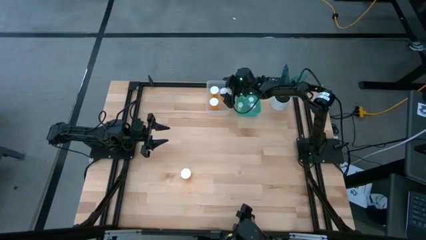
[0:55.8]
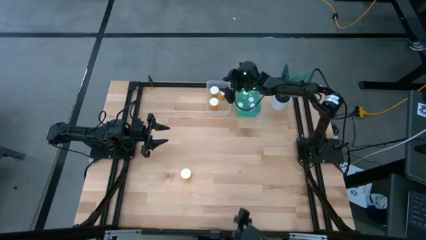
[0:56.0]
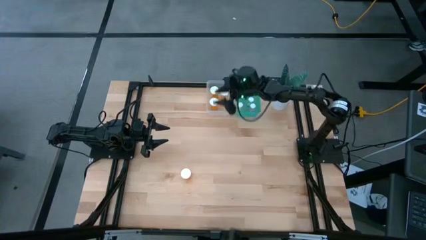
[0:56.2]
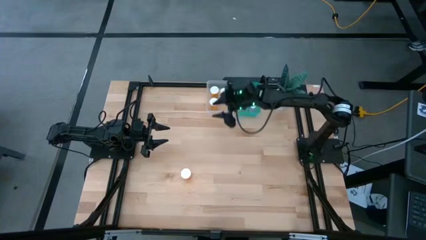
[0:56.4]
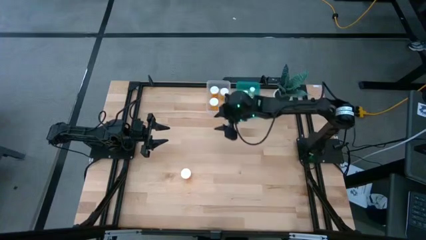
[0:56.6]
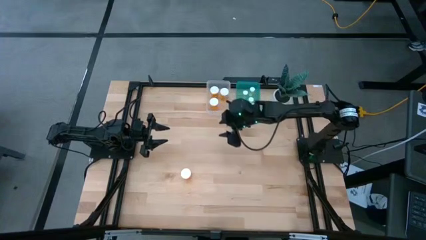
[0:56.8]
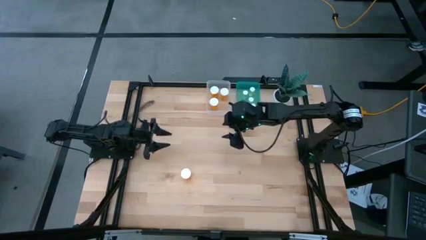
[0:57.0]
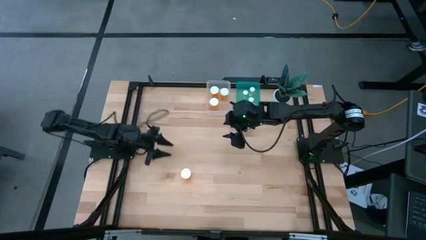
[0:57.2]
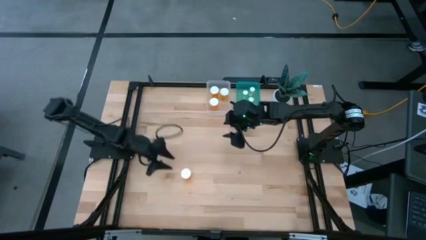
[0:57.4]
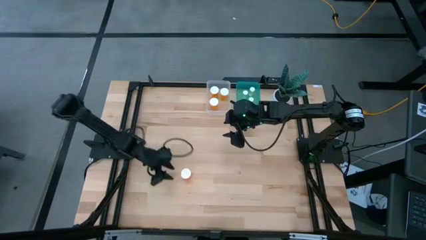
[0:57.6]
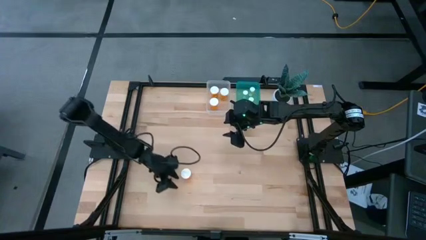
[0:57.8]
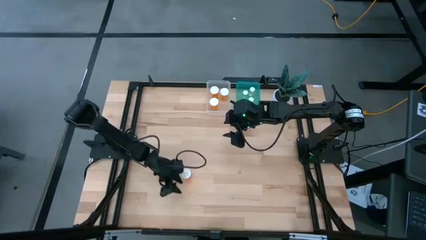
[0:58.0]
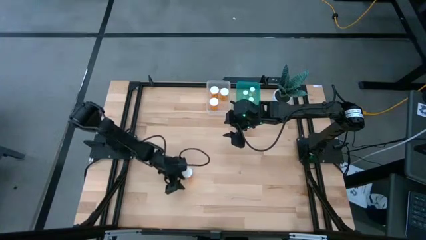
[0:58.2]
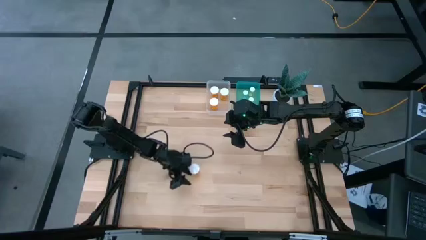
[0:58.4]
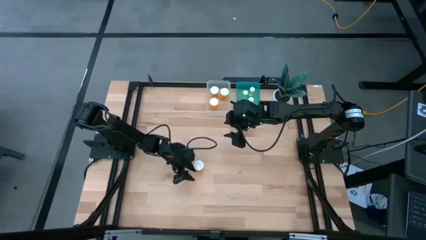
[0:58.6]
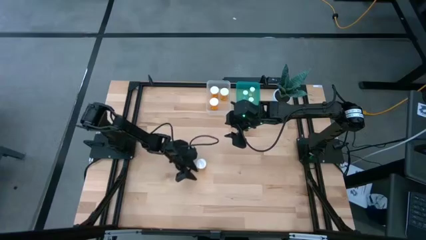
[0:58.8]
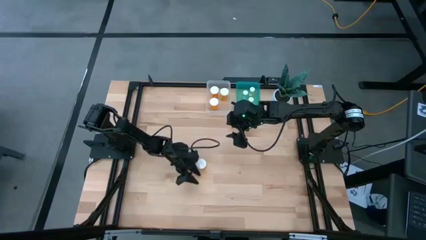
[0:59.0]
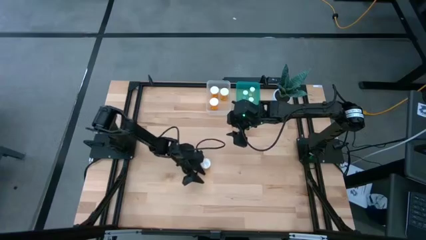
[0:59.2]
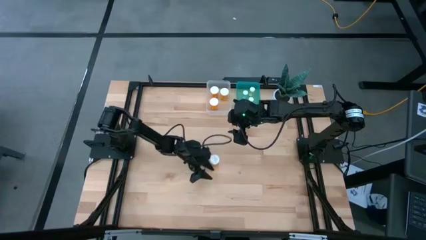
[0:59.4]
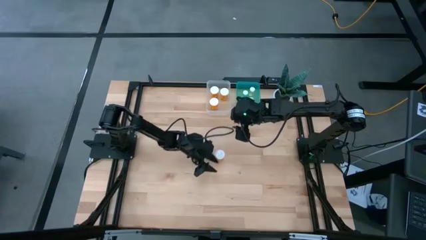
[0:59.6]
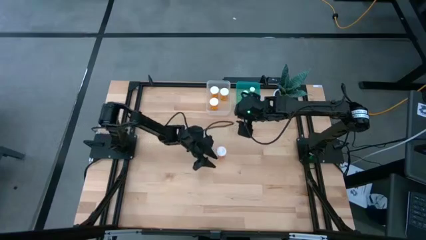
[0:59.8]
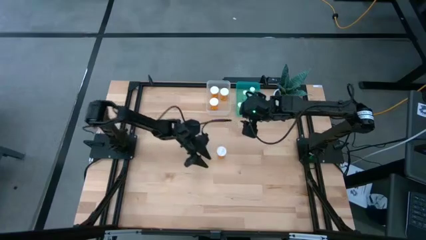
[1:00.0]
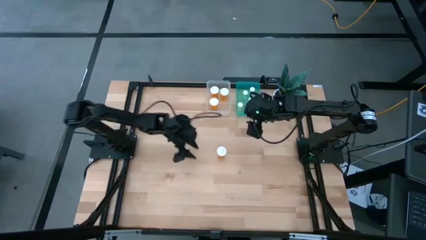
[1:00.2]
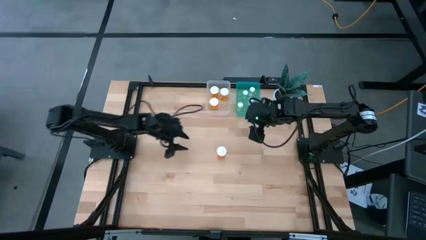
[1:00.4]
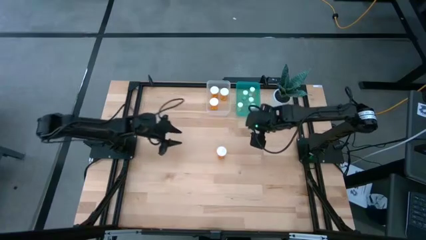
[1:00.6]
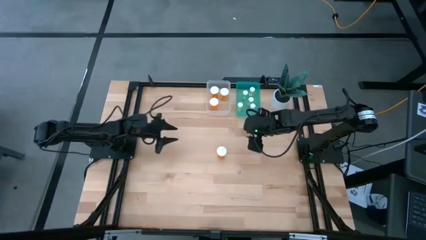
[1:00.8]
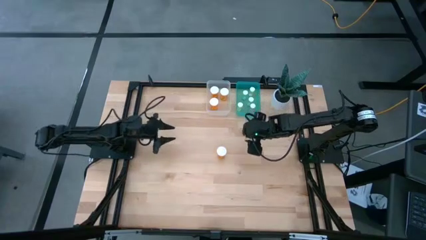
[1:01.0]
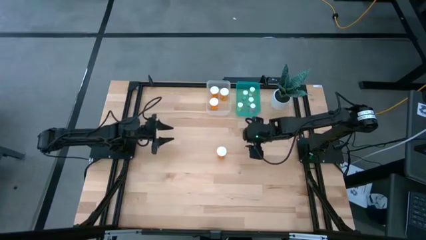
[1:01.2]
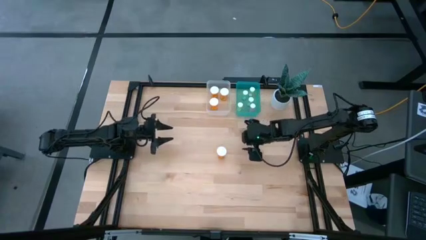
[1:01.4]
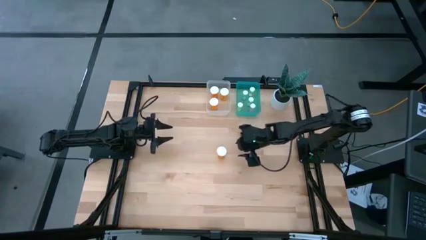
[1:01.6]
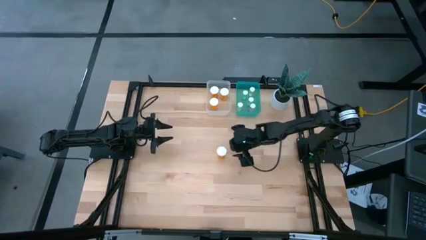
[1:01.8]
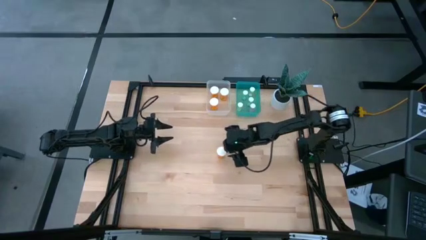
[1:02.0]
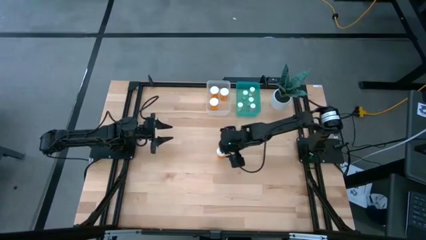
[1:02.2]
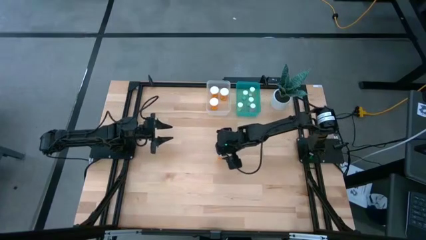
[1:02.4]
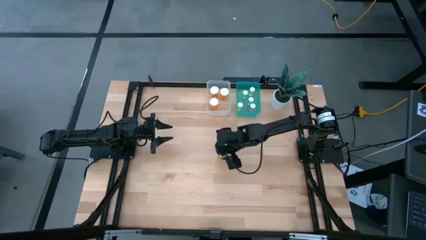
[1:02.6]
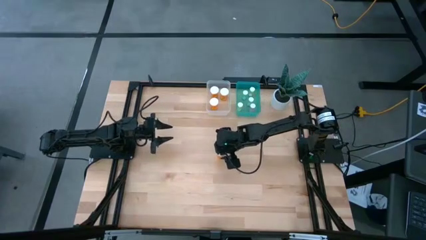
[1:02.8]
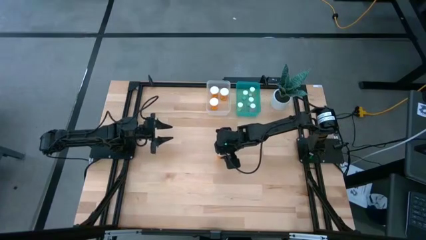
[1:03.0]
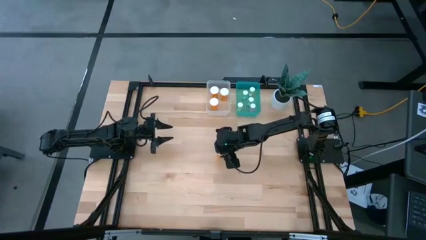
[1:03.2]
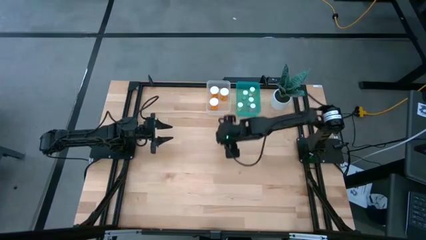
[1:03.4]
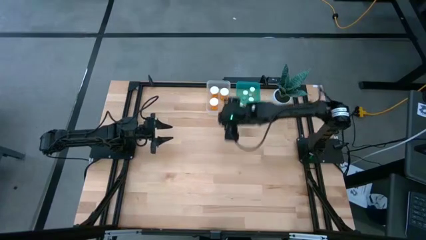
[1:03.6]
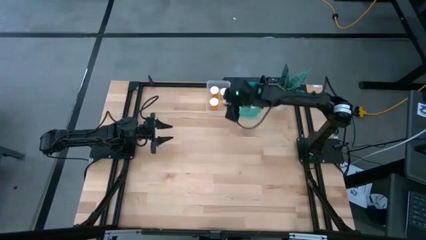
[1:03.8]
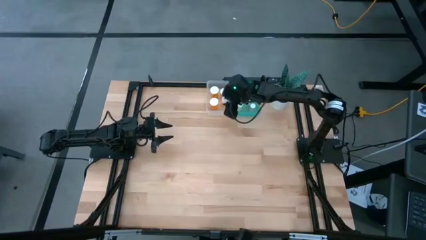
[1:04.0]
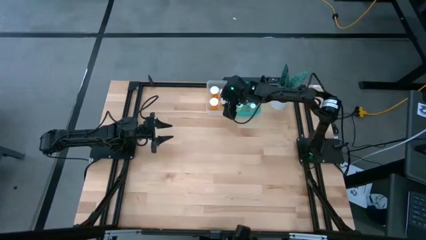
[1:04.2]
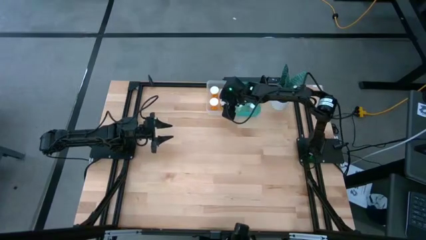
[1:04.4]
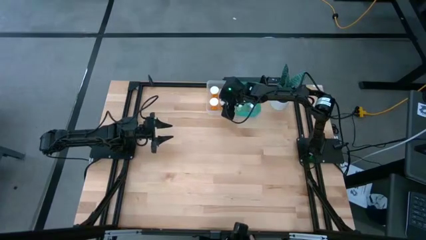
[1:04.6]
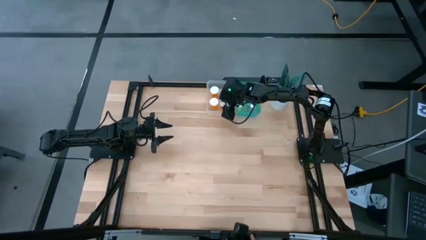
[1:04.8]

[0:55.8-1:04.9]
Task: Pick and place medicine bottles into bin by pill shape (circle, oval)
Put the large orange pill bottle into transparent bin

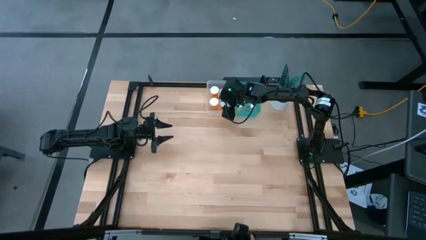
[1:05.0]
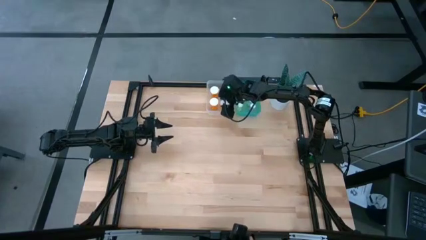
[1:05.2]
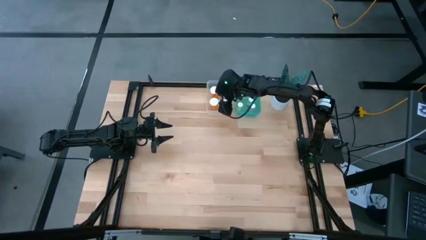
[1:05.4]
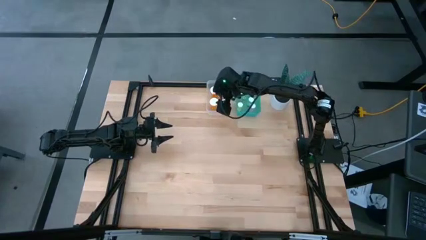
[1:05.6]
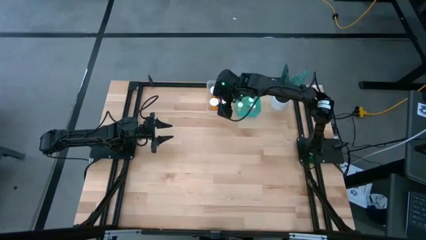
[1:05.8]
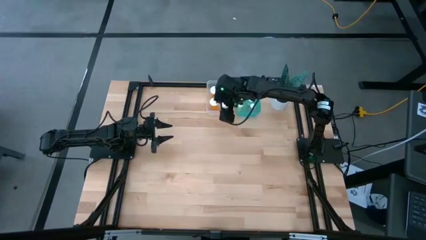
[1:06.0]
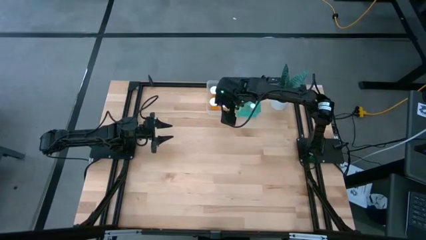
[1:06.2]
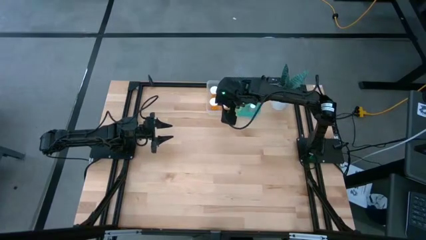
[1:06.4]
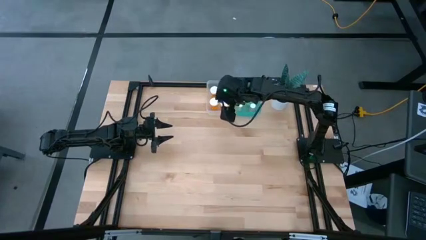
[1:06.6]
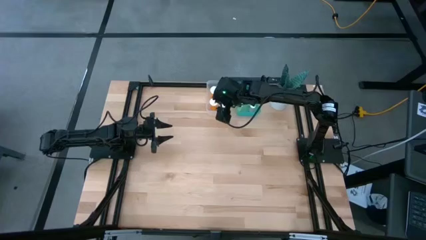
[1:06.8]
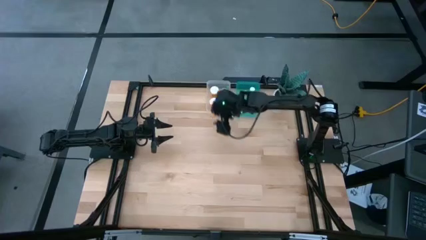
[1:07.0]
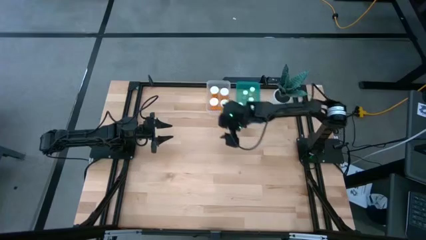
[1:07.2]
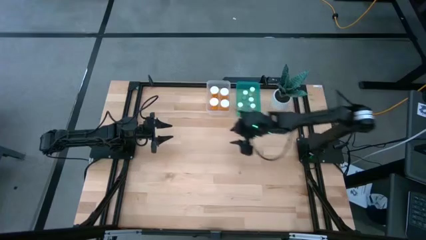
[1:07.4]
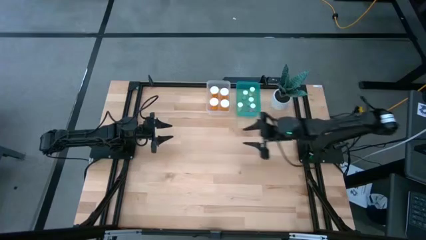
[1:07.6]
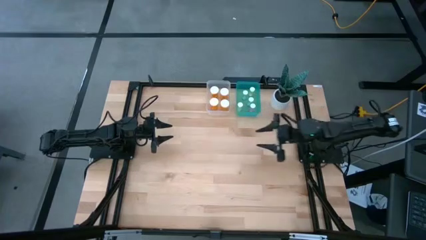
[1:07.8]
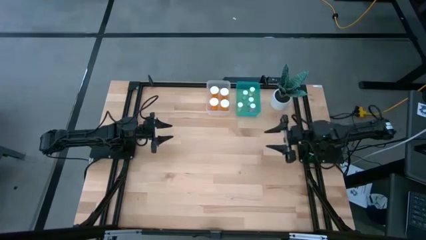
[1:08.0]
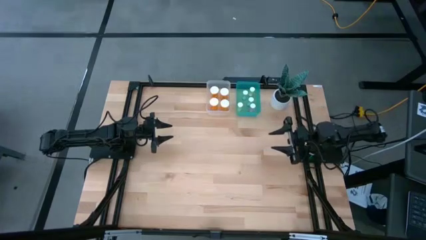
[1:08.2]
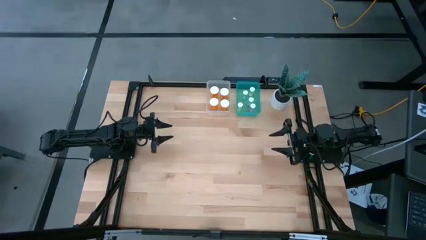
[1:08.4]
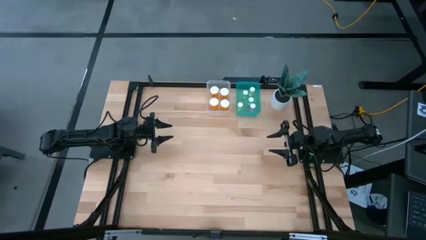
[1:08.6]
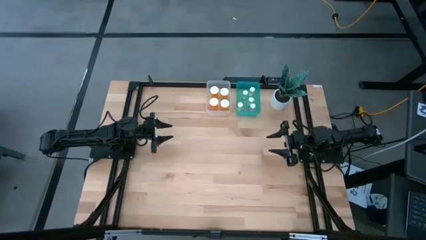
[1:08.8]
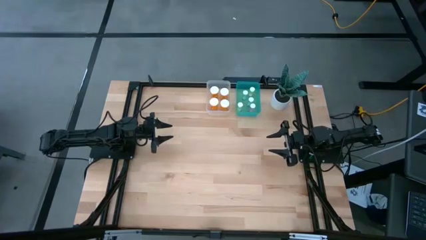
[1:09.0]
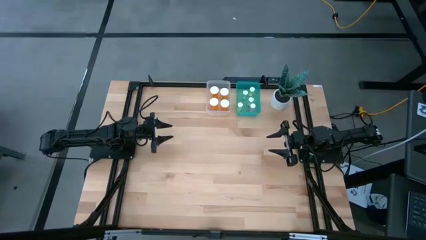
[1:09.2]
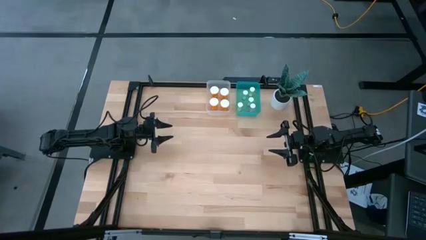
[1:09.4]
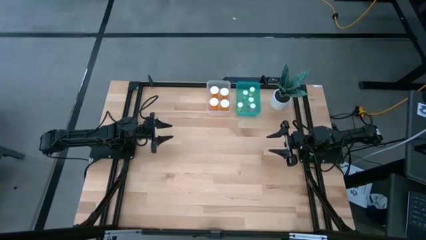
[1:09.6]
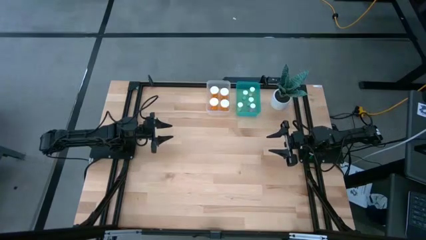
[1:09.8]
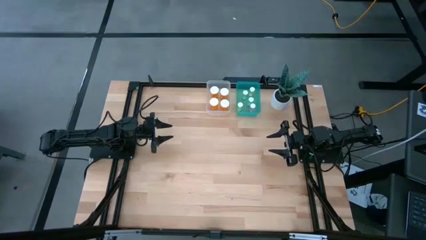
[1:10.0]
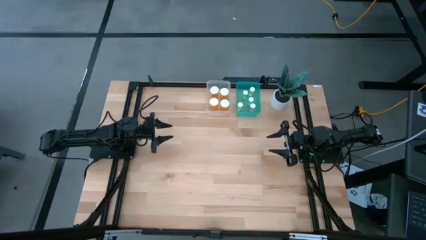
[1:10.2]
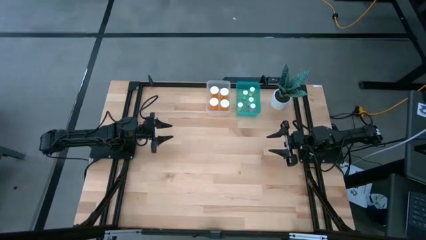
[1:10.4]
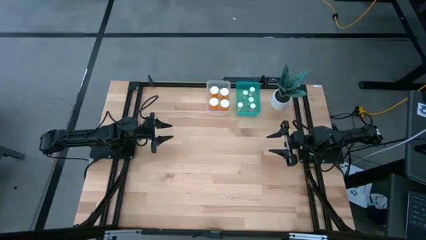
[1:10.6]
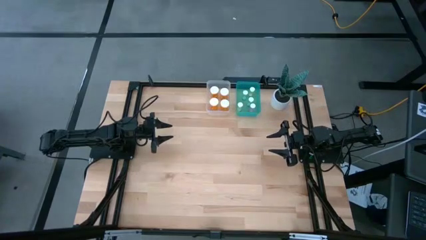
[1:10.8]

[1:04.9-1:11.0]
Return to Home Position

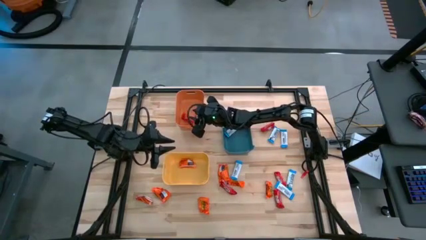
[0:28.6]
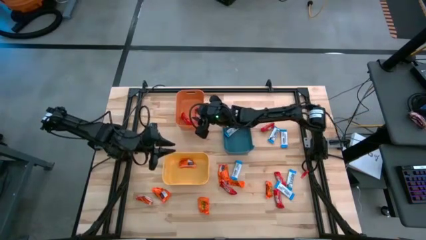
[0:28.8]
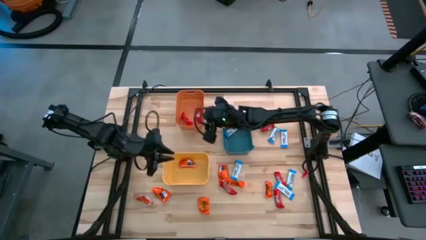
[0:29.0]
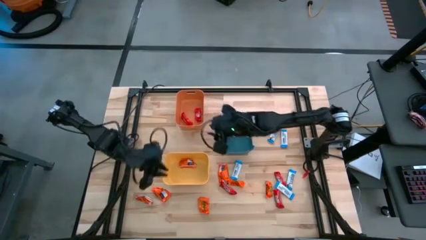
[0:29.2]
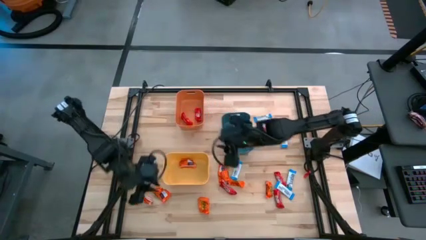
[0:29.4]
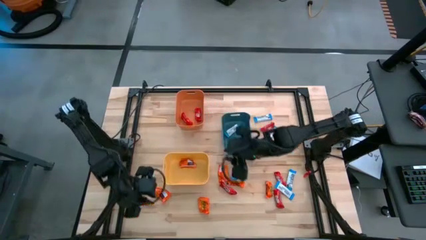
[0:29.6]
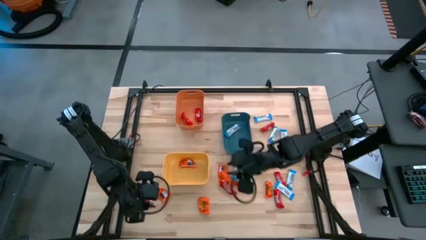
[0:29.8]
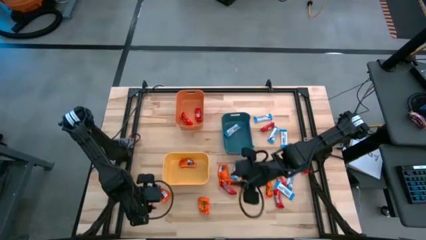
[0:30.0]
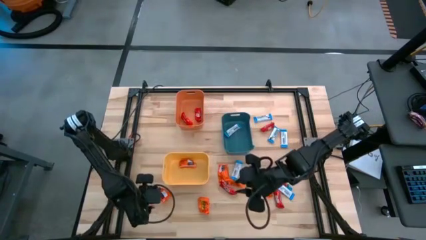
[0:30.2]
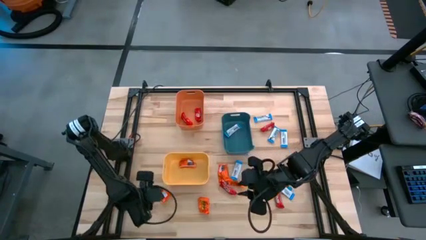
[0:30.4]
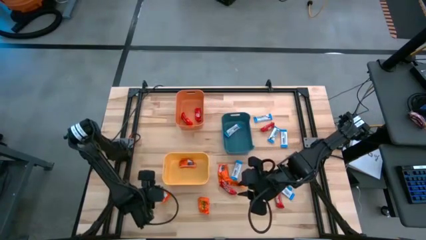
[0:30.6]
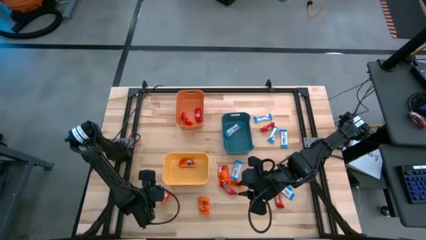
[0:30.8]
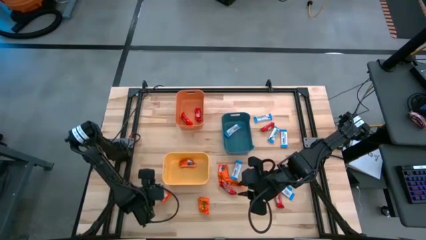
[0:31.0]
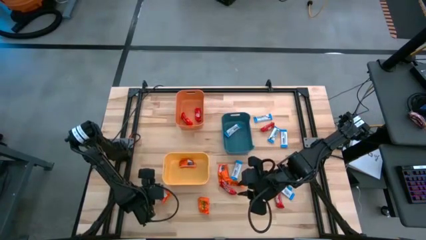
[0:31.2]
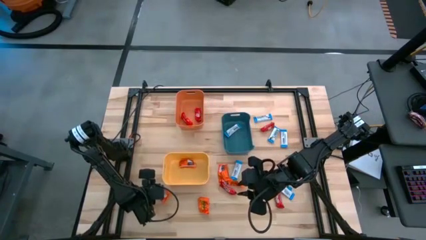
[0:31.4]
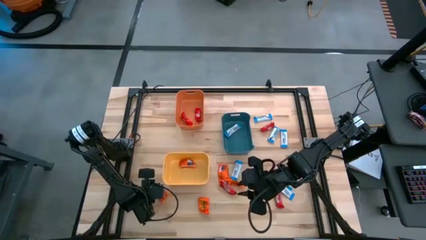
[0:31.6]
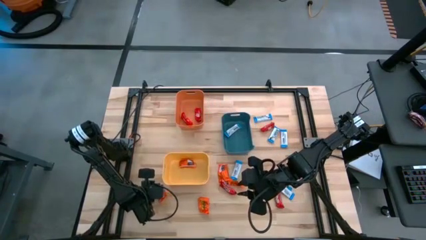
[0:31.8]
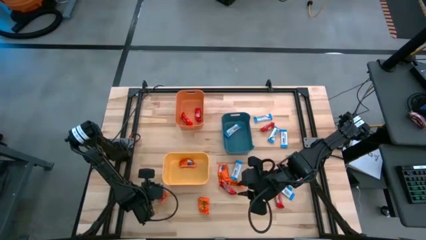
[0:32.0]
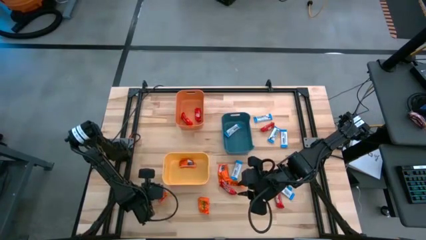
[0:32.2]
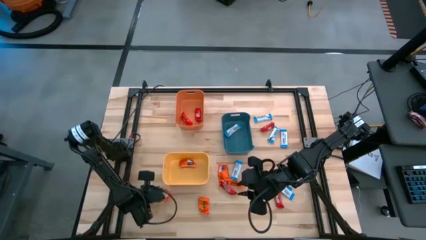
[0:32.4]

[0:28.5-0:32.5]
Task: Organize candy in baskets
Put the orange chocolate into the yellow bin
